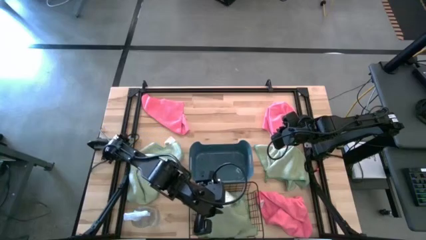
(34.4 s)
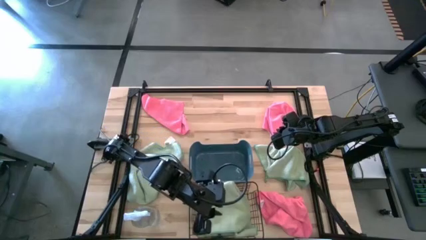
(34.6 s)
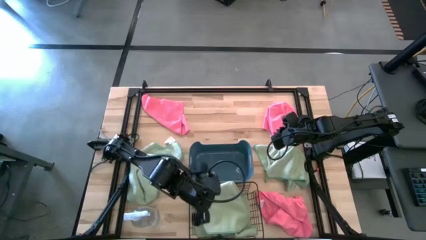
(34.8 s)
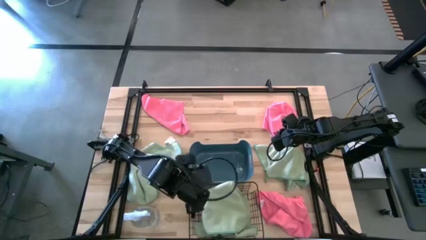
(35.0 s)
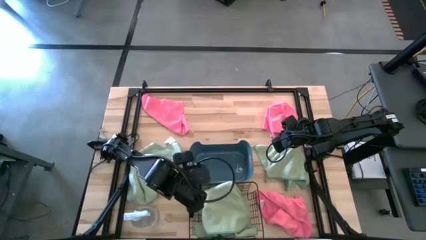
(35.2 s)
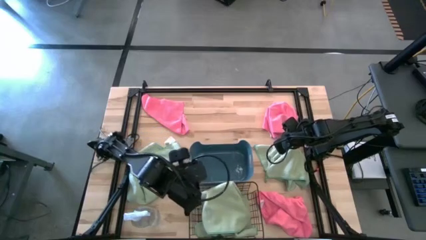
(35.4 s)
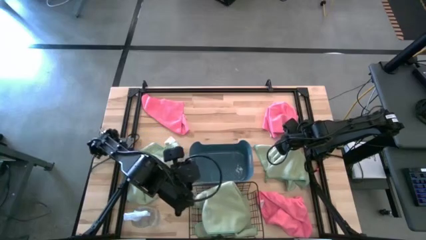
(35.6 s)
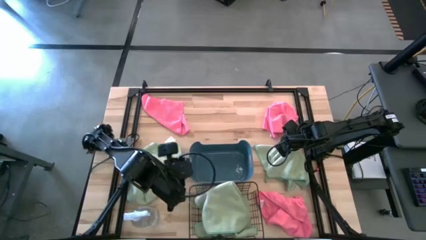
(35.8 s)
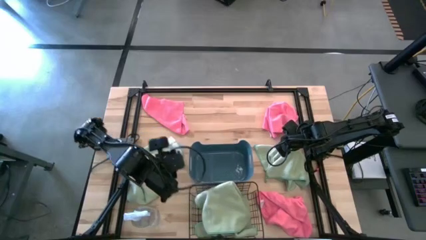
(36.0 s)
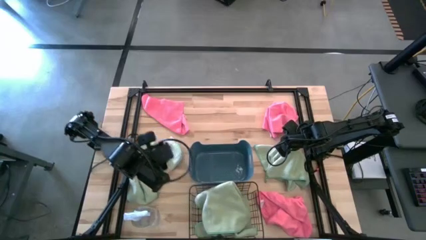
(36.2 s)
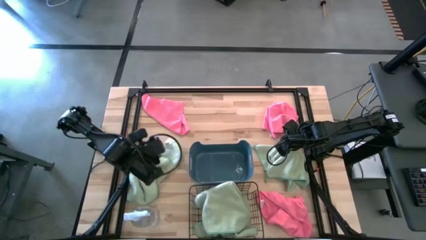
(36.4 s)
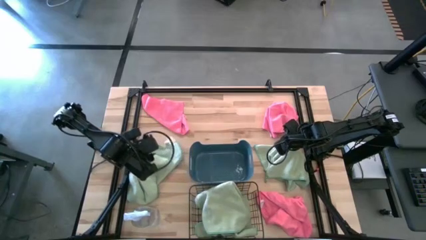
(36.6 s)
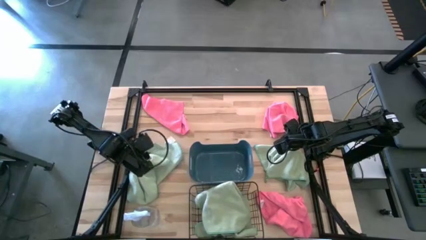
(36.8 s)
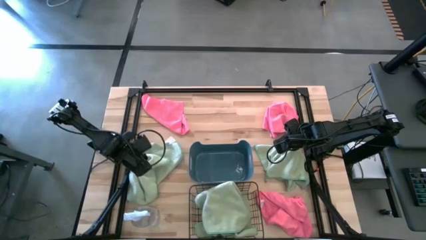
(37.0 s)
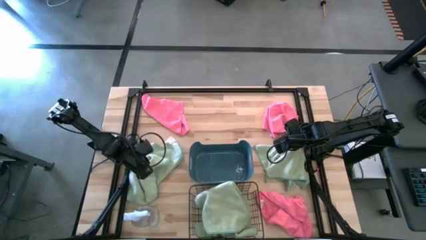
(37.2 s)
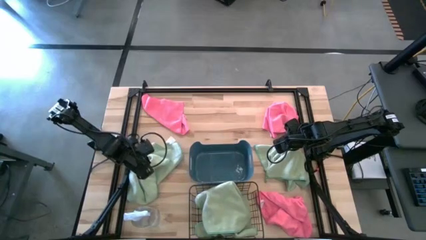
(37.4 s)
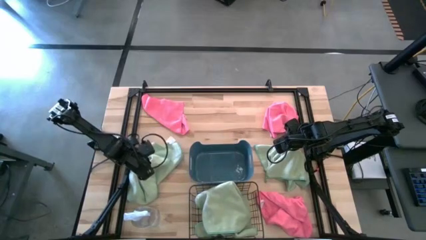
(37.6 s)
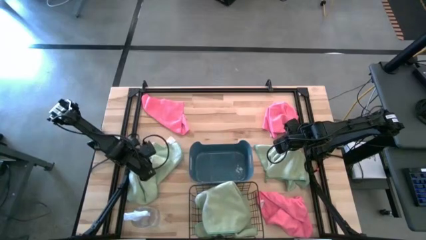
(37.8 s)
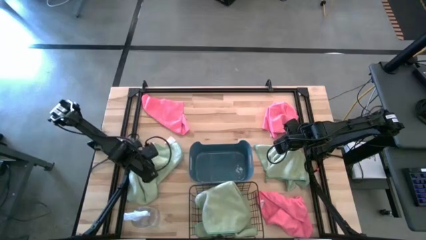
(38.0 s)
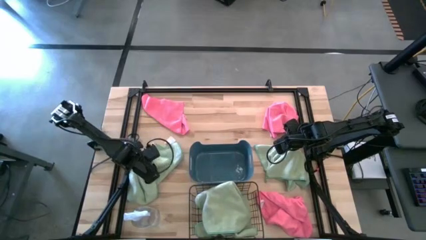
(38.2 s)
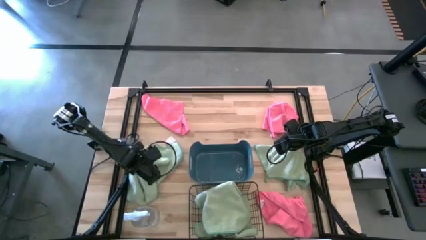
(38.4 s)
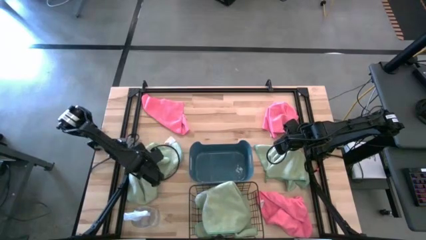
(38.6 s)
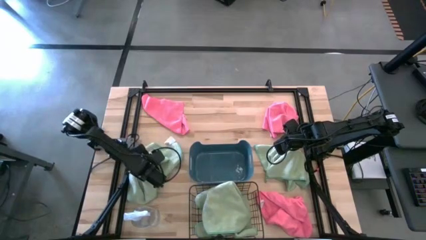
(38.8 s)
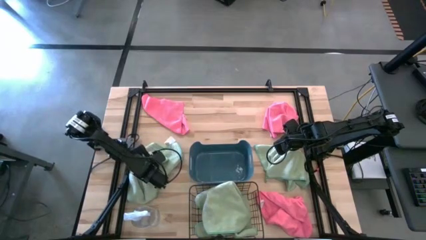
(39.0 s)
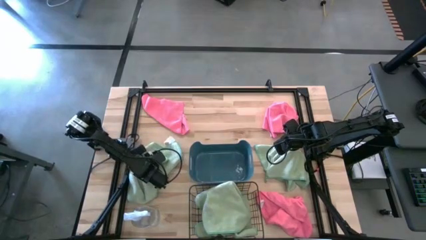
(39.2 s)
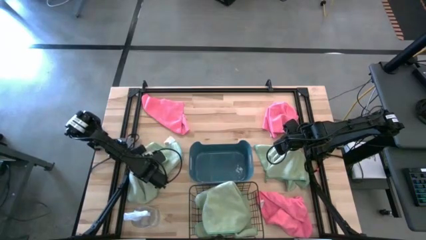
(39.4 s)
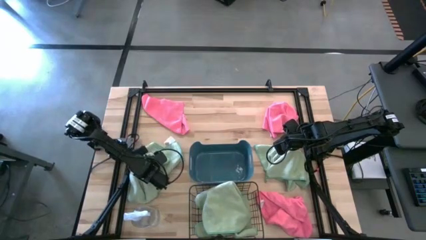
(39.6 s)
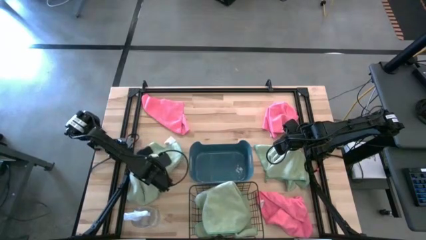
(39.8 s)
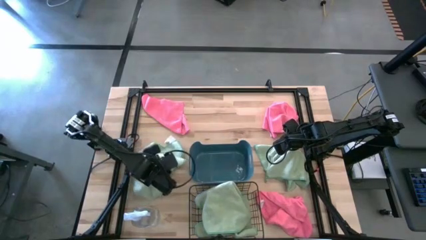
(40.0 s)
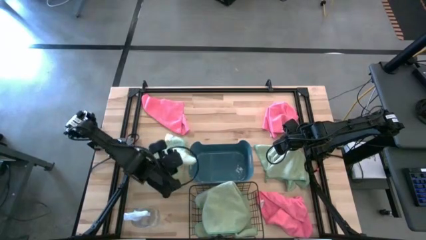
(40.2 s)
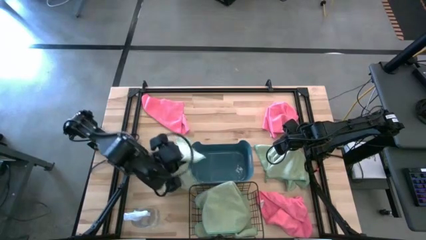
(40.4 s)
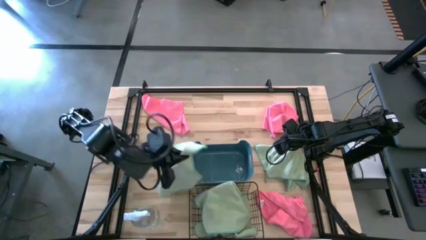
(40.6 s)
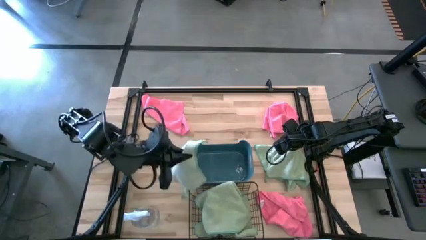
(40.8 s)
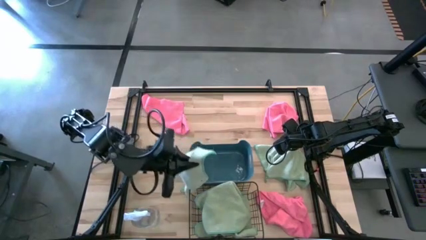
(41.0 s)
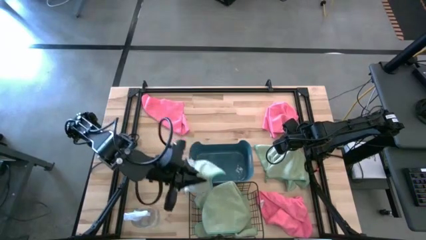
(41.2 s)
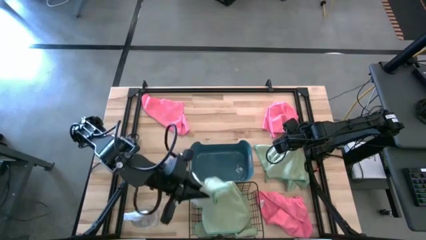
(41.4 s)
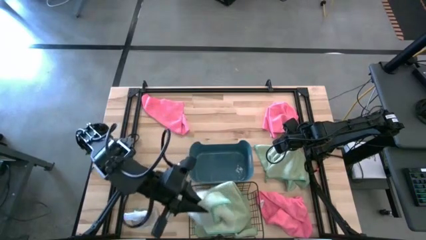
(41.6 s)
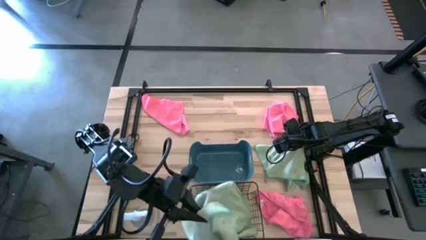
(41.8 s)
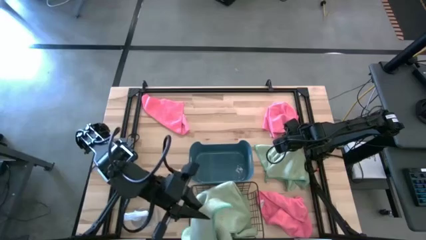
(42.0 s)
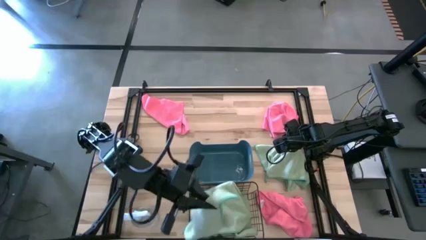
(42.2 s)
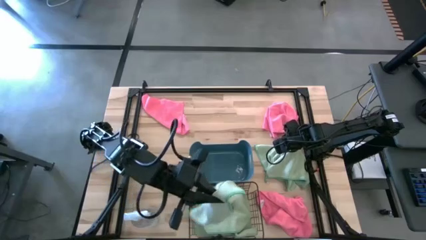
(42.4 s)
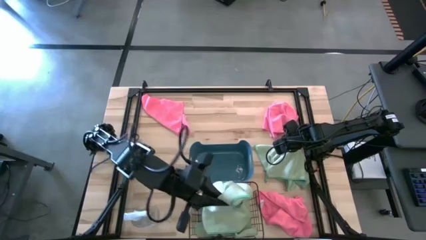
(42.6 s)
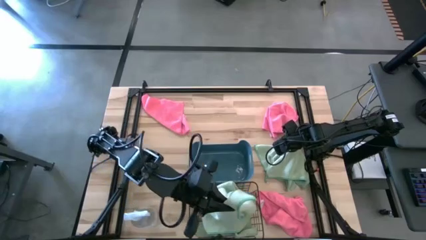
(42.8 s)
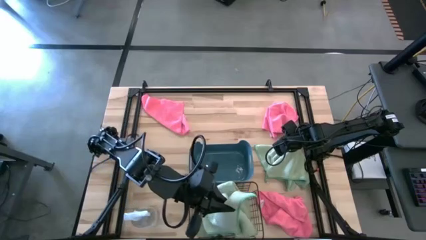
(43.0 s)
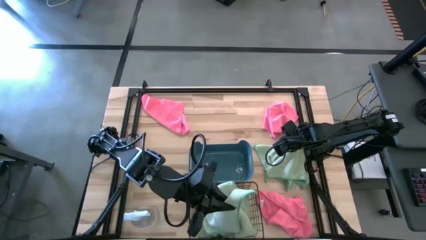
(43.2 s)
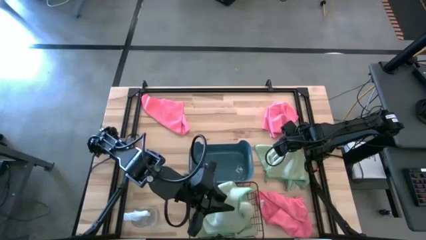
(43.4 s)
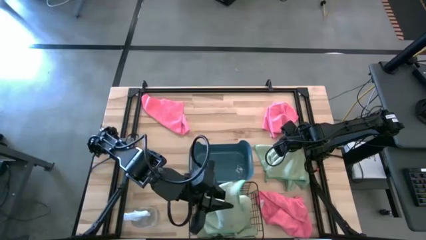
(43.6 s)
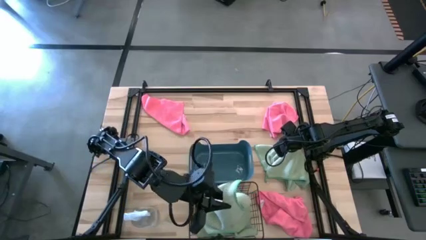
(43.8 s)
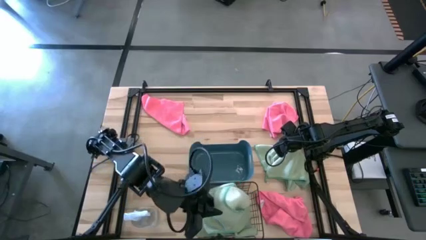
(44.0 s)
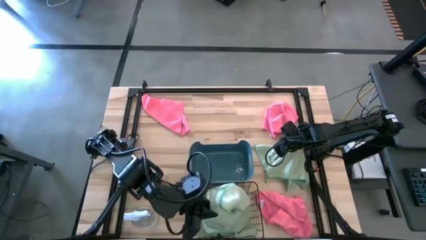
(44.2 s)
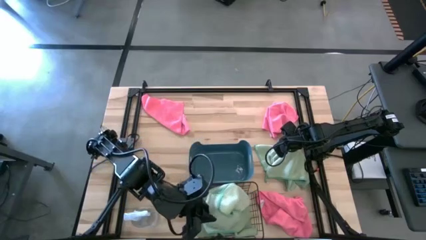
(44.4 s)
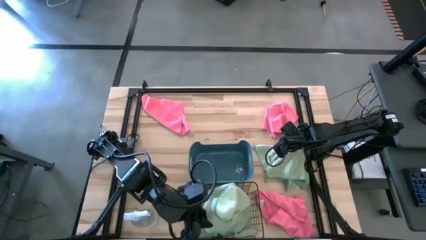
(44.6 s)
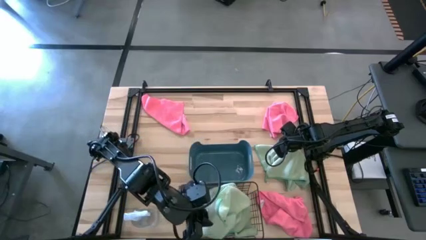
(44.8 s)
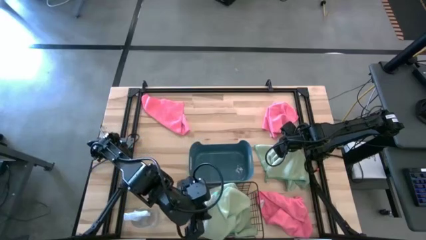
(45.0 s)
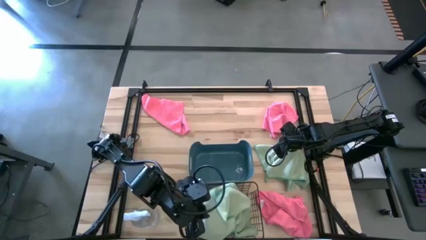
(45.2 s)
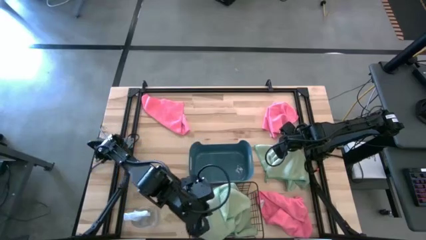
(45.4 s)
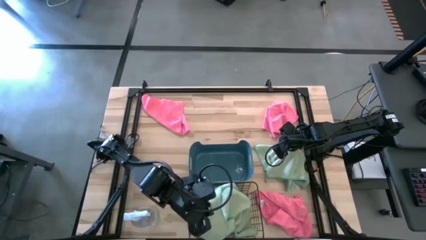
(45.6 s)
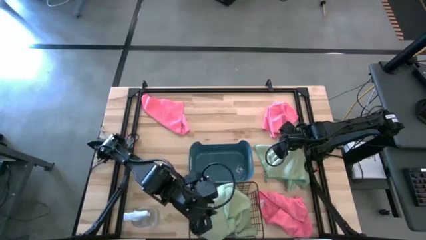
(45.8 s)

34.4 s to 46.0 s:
Task: Sort microfiber towel by color & place in baskets
Put the left green microfiber towel into the mesh storage bin

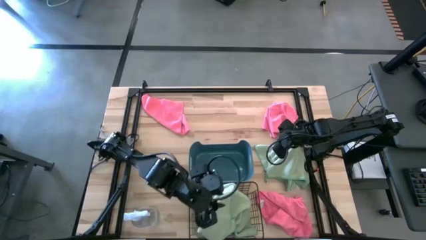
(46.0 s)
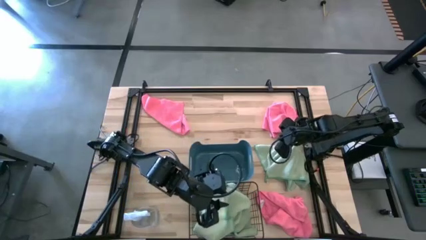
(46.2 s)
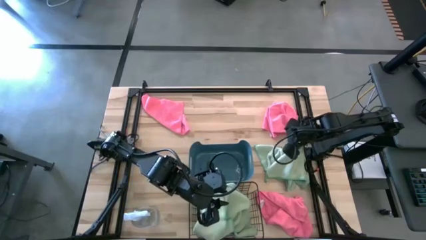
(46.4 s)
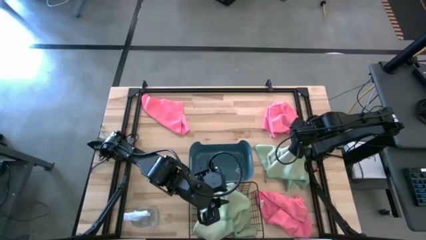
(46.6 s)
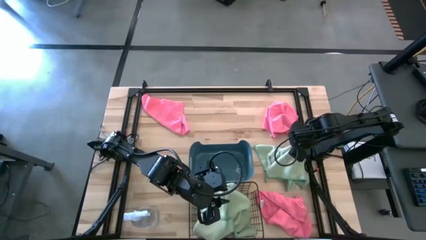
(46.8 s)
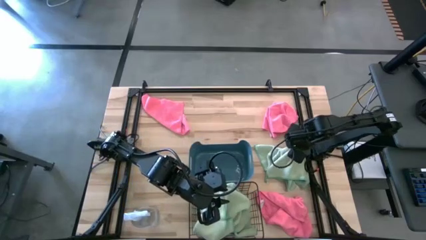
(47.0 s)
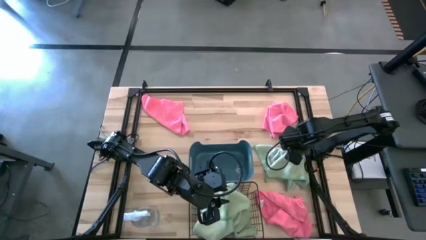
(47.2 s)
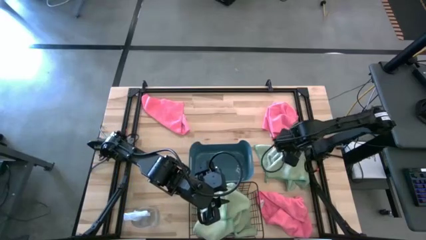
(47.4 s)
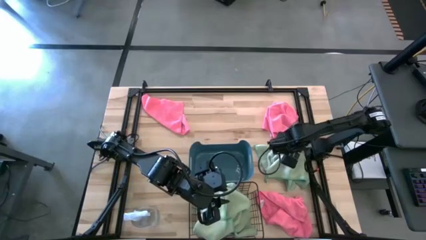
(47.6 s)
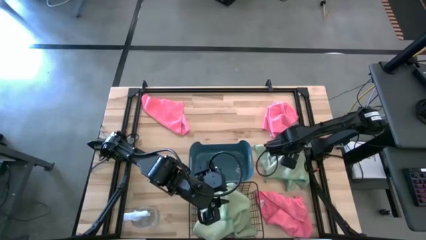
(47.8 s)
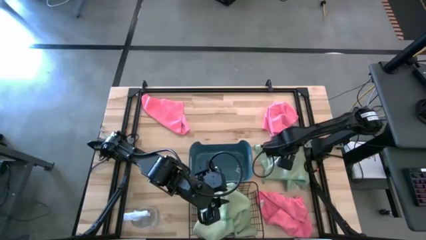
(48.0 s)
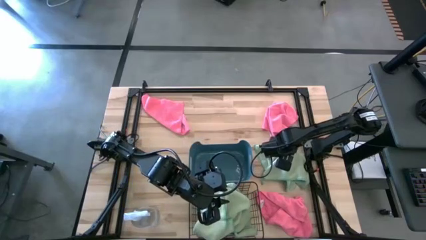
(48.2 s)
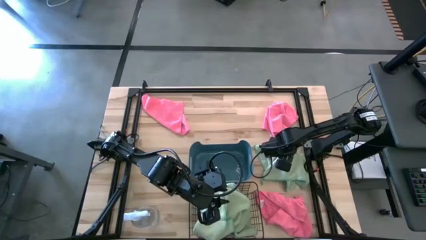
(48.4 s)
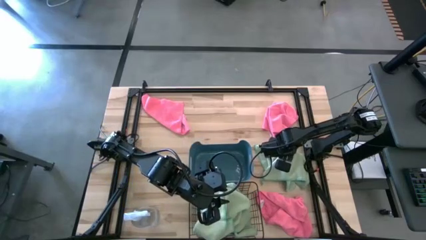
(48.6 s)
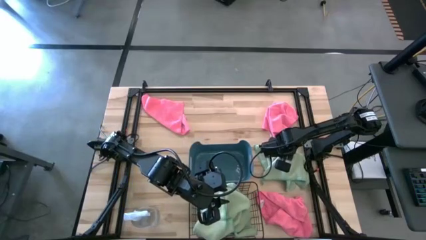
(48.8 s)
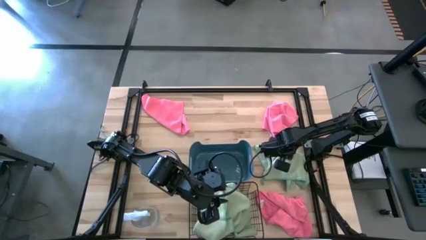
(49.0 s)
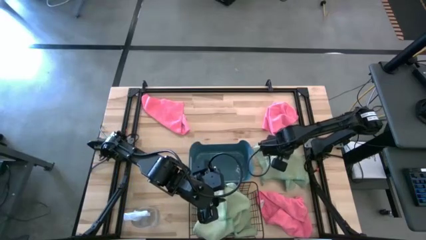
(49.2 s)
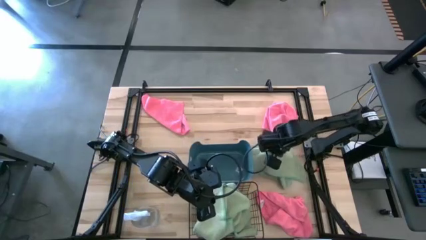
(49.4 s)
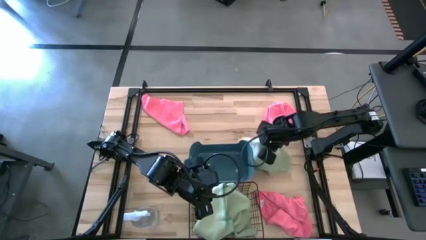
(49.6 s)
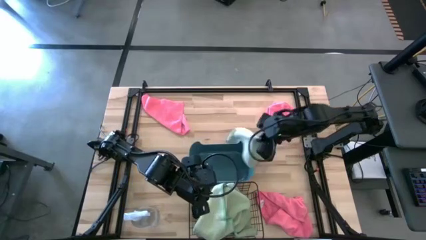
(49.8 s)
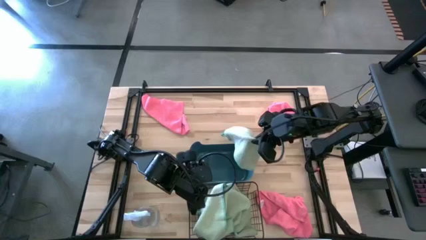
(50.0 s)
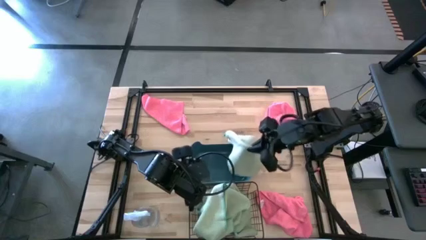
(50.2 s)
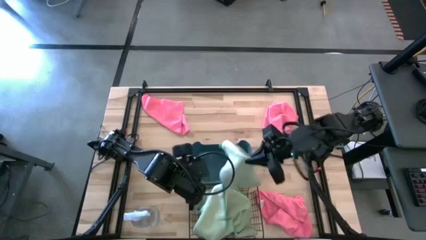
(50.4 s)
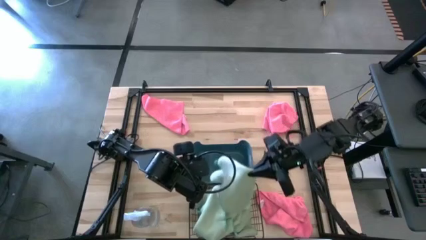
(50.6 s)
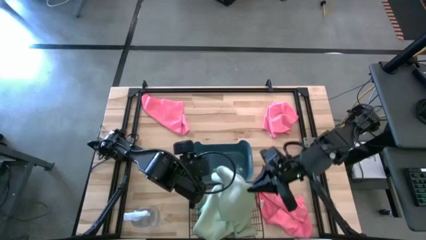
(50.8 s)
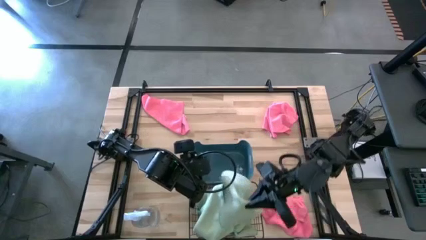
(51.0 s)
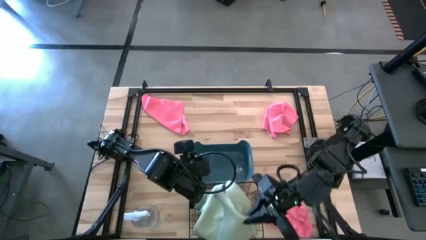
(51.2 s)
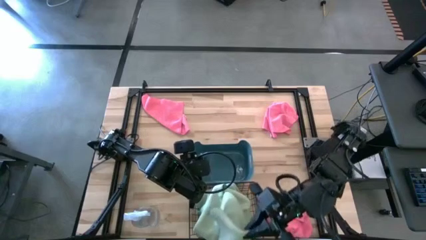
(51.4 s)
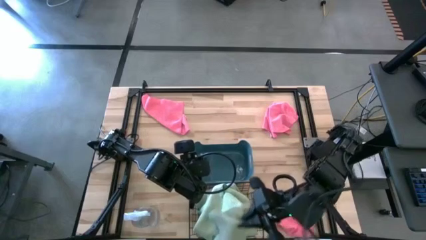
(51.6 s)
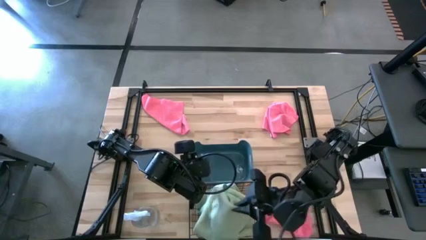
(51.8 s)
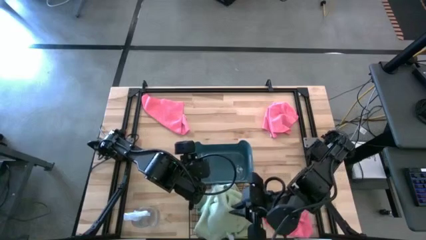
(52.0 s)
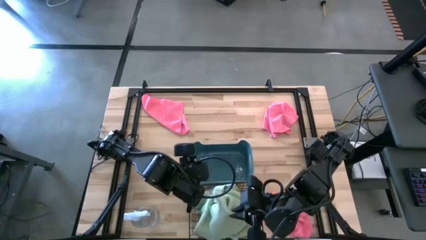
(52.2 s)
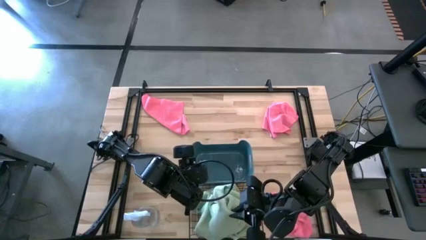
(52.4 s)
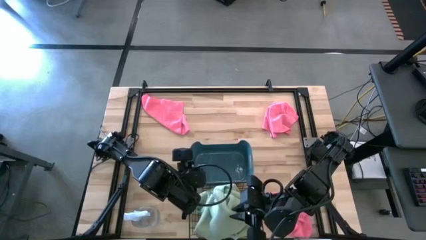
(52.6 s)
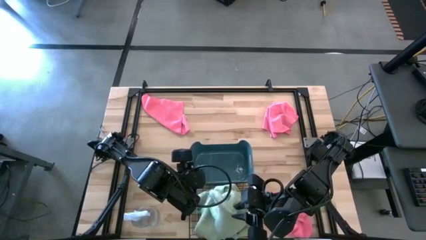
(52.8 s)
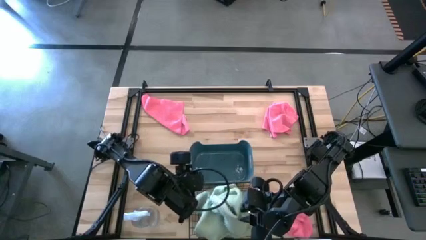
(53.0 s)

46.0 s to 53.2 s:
Put the green microfiber towel into the mesh storage bin
